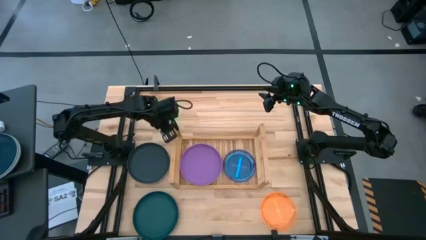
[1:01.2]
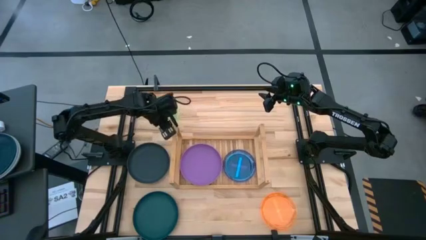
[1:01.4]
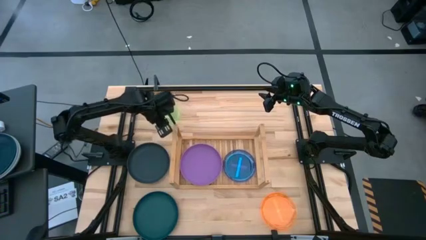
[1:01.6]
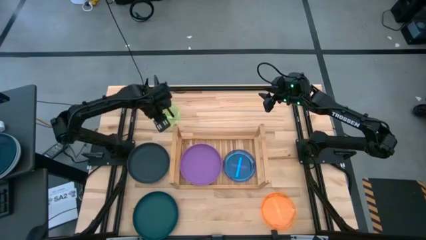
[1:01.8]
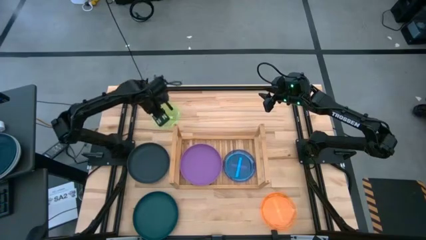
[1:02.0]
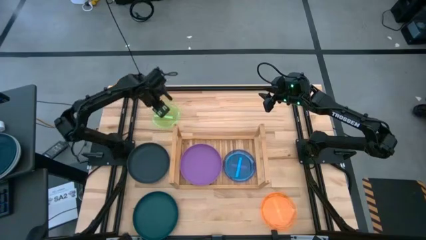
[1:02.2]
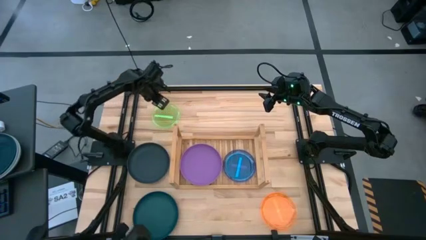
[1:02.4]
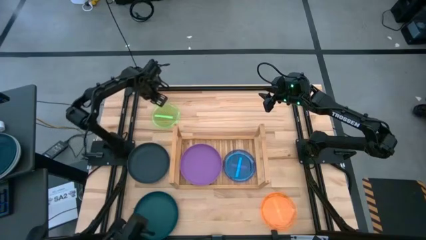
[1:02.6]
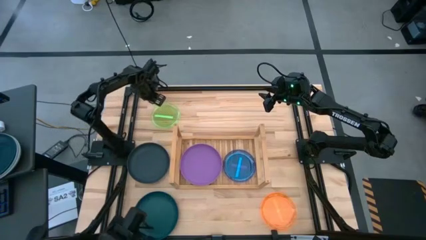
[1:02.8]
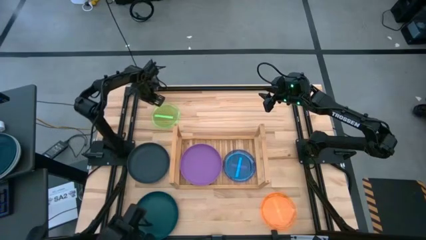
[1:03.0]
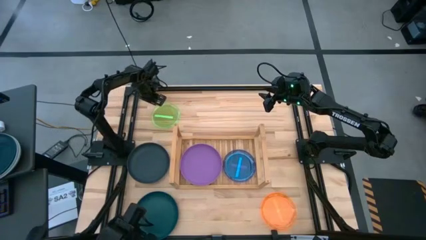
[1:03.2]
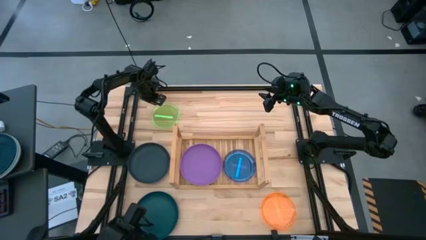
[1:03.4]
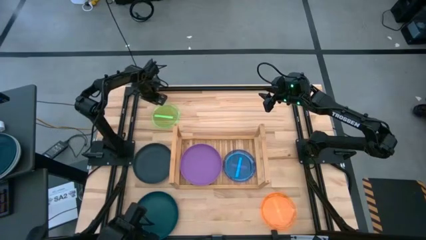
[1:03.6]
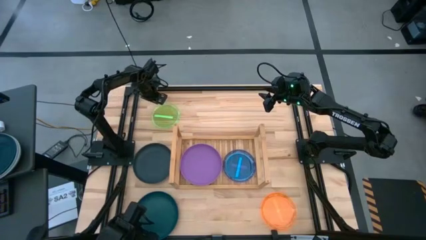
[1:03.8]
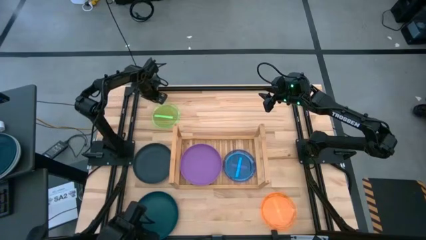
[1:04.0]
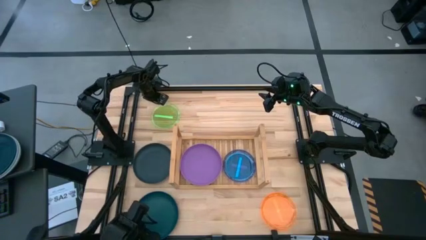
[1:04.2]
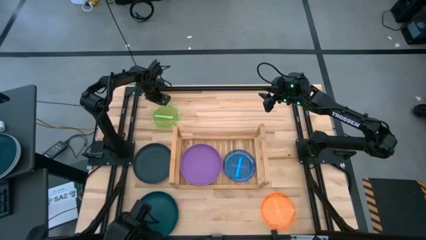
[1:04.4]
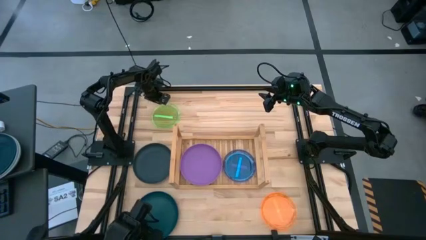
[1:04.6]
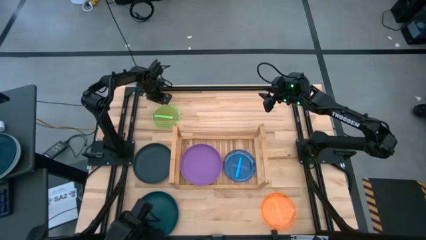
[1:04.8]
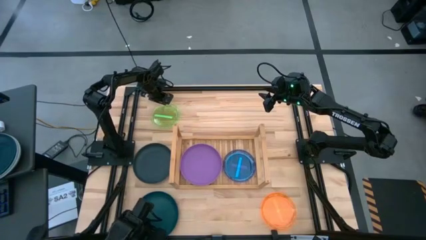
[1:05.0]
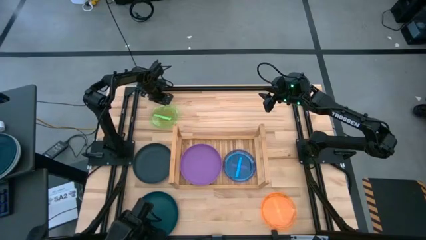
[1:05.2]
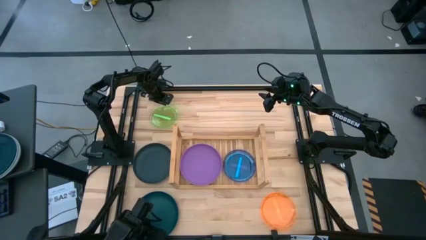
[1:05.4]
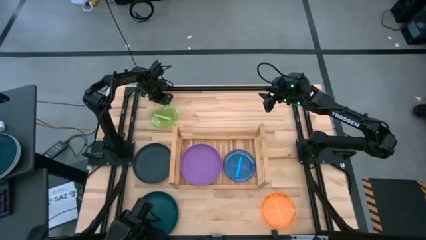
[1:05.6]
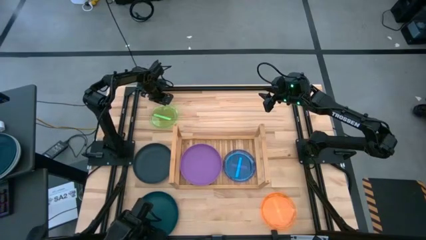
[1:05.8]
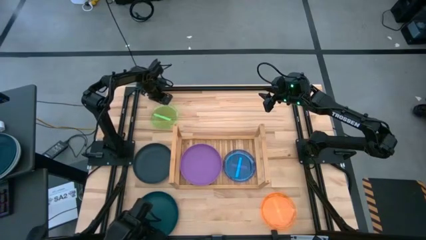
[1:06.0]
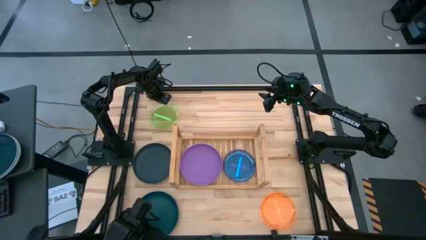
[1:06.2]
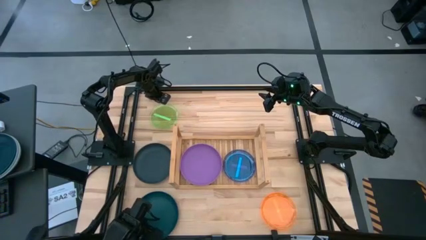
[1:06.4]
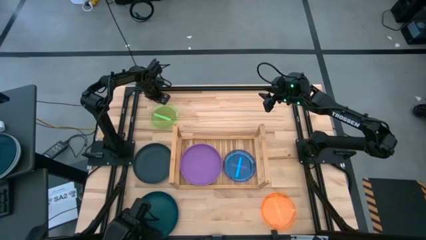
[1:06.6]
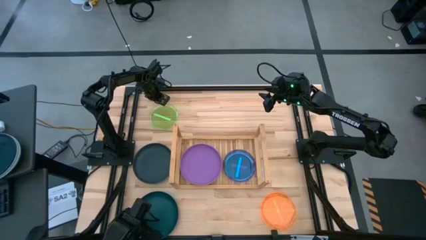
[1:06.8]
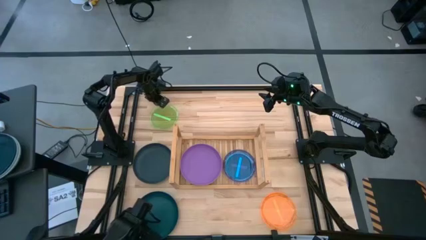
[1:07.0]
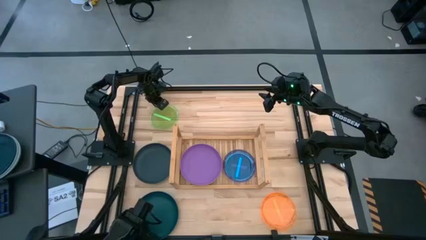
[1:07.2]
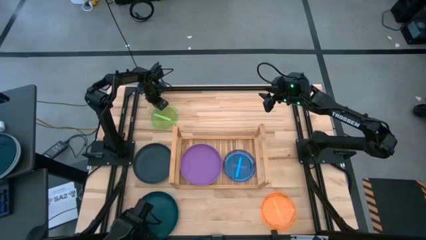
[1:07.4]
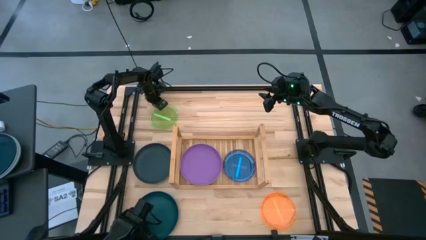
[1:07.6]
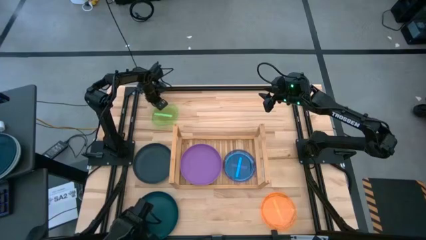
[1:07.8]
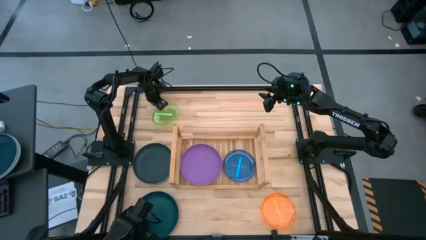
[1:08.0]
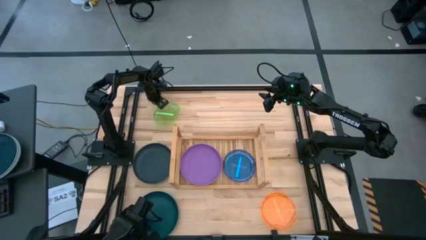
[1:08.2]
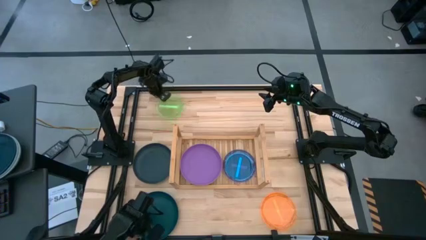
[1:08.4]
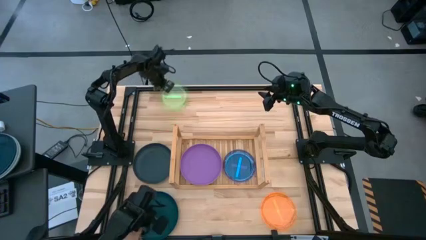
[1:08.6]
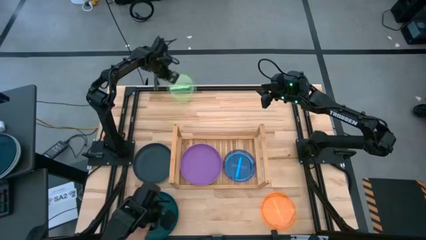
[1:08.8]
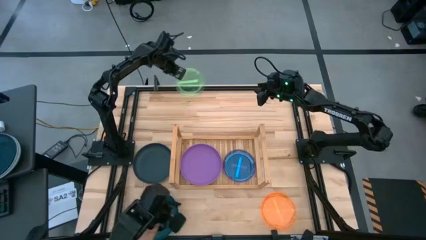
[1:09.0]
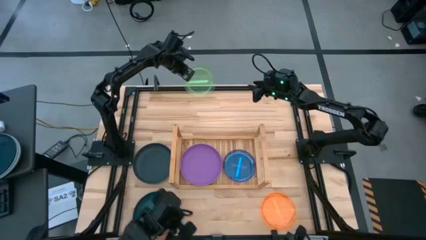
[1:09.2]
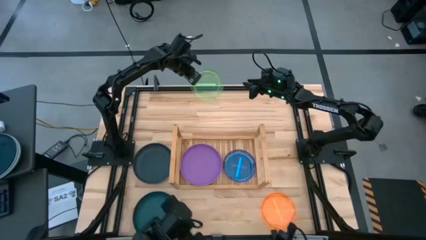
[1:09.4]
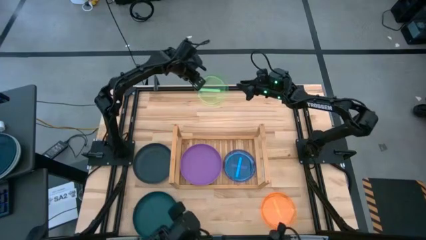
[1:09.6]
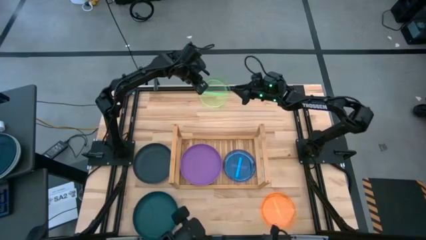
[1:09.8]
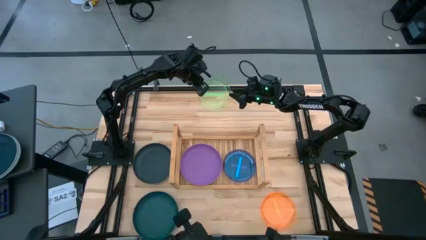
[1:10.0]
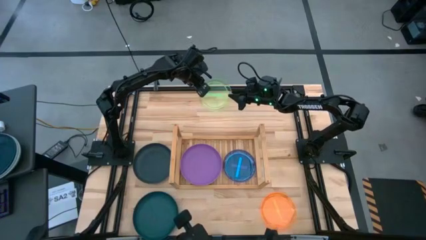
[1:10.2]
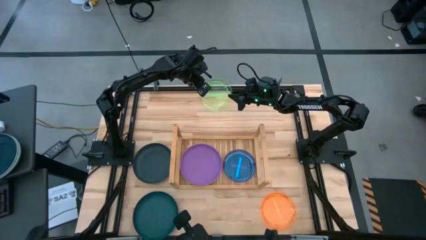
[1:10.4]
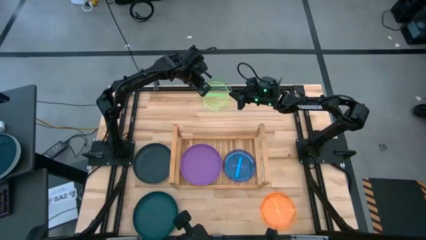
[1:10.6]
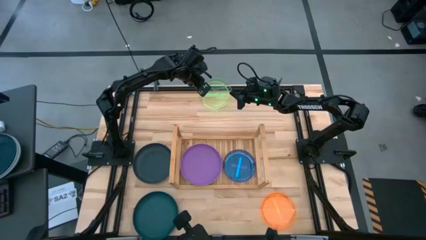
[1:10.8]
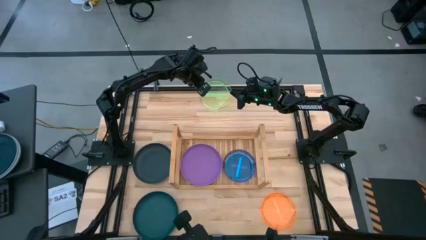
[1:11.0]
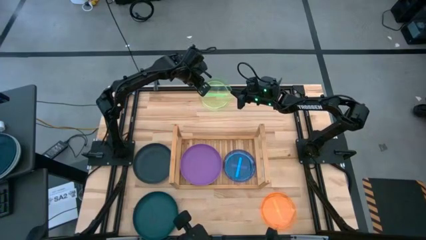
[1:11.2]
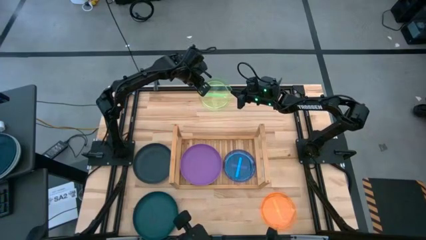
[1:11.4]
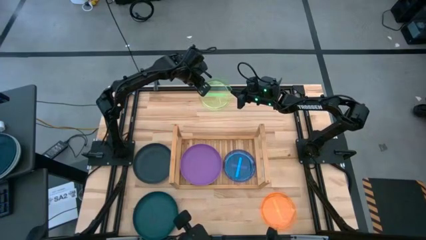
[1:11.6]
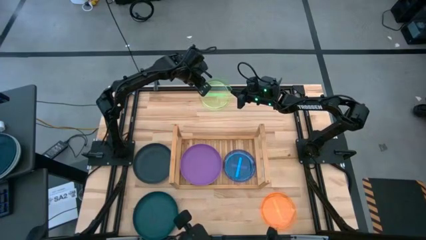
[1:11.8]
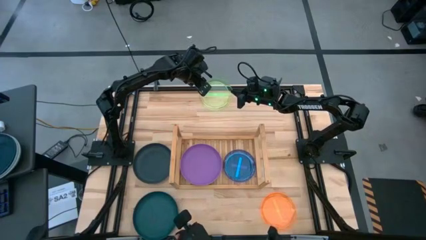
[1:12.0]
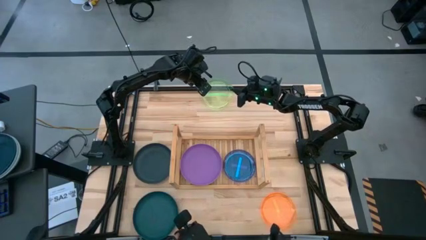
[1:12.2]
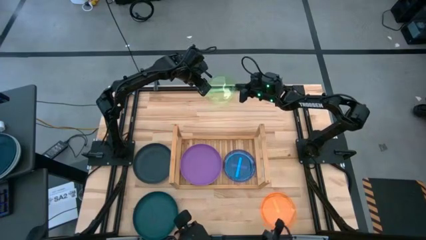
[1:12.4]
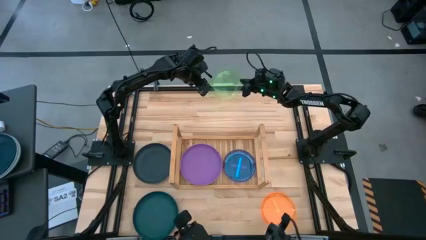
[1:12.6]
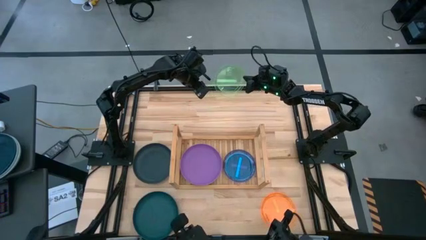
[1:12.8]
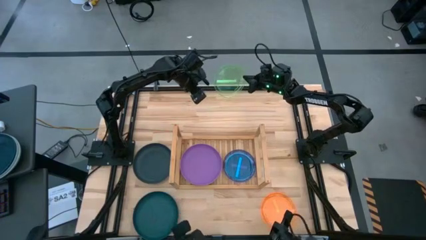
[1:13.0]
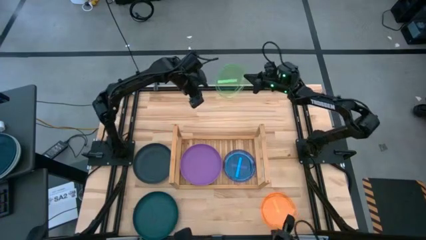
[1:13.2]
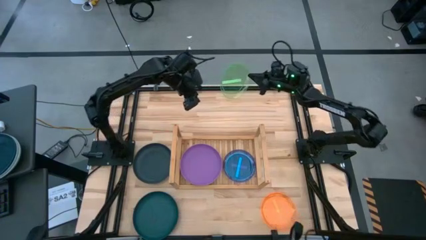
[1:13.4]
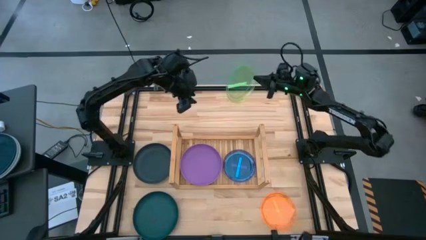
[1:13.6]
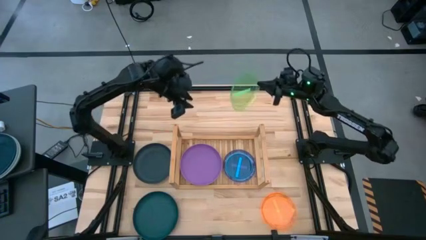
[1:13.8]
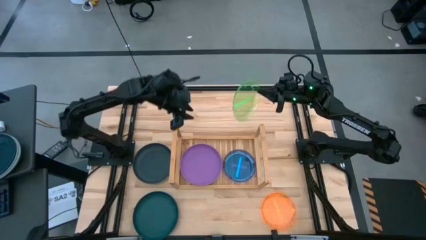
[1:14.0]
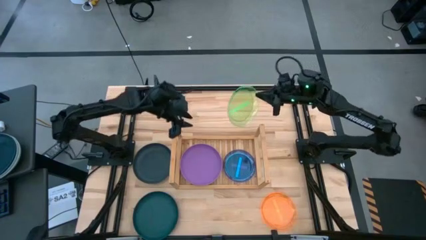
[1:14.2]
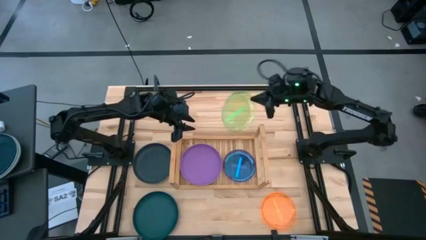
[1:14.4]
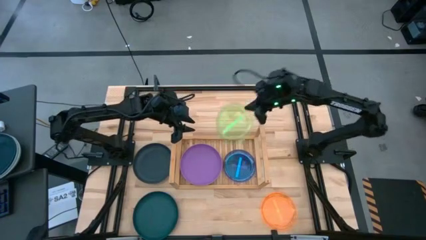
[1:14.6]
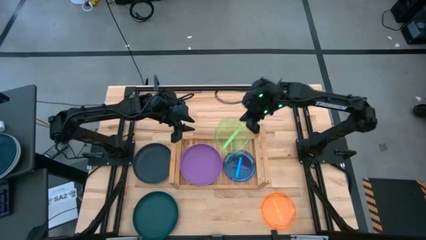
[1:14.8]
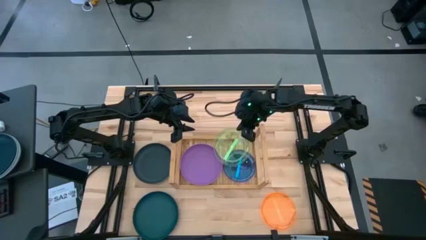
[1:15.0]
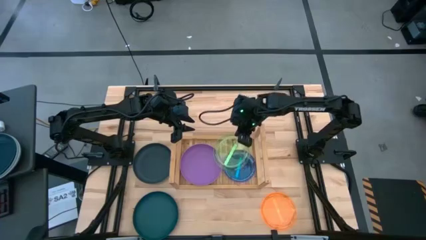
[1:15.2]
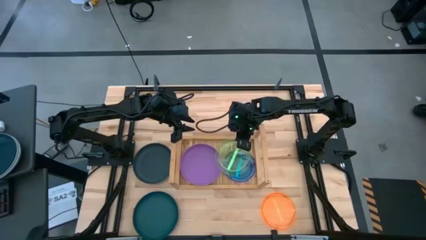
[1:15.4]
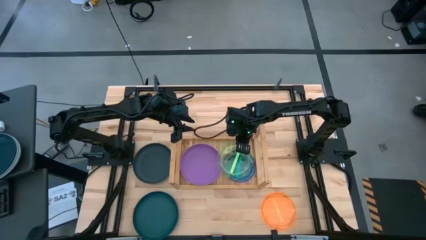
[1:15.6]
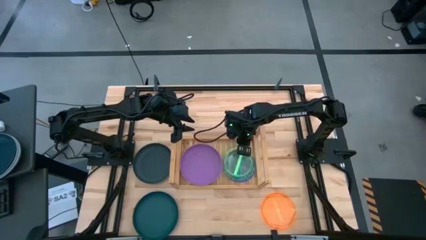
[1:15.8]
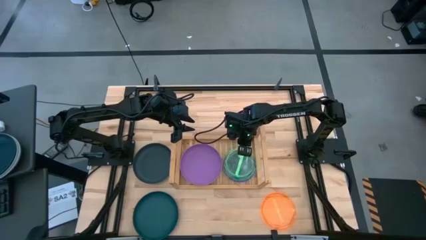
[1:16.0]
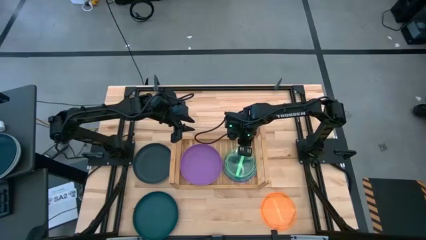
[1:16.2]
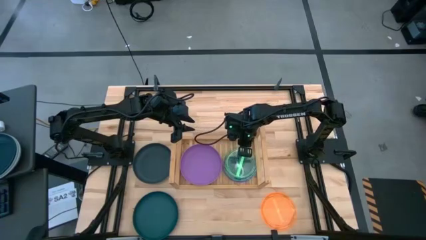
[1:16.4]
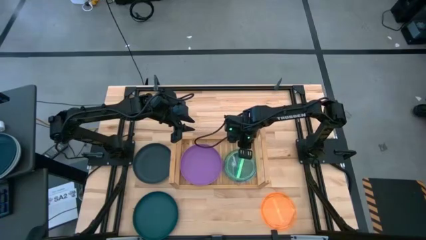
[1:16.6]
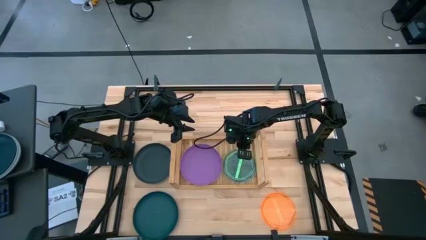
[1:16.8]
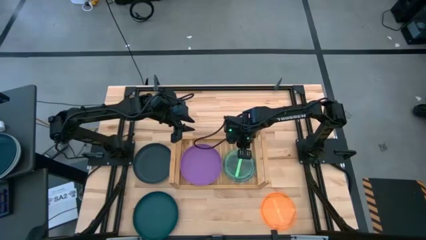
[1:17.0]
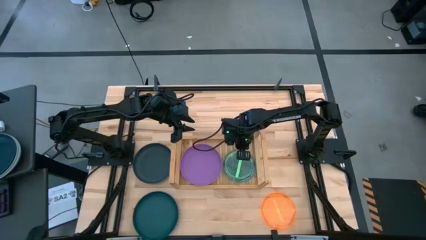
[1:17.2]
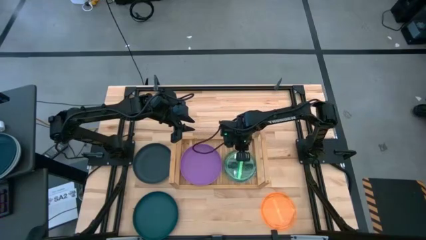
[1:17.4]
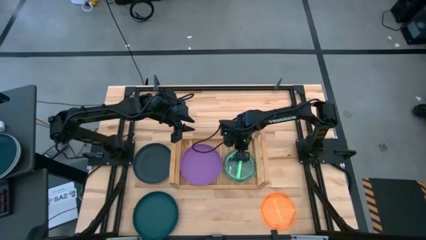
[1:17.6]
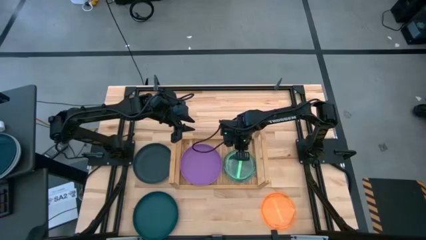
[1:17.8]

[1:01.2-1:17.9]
Task: Place and stack plates onto a shelf
Stack the green plate on top of the blue plate on the shelf
